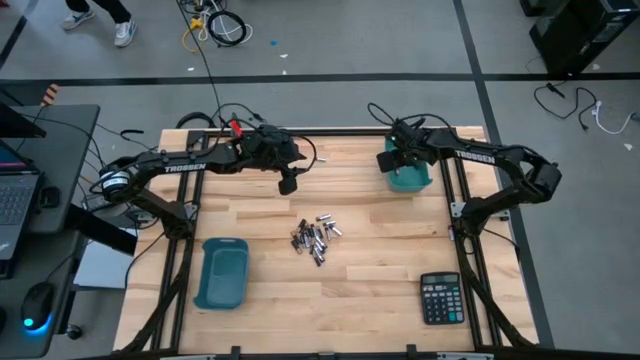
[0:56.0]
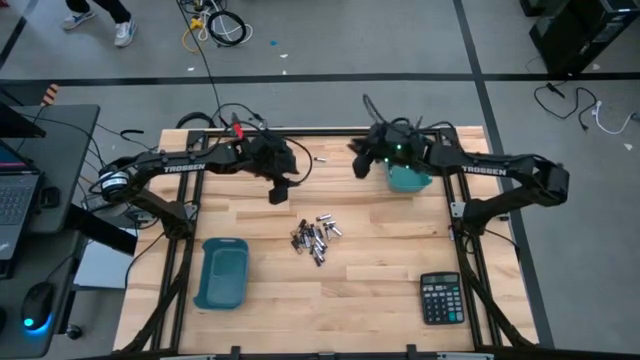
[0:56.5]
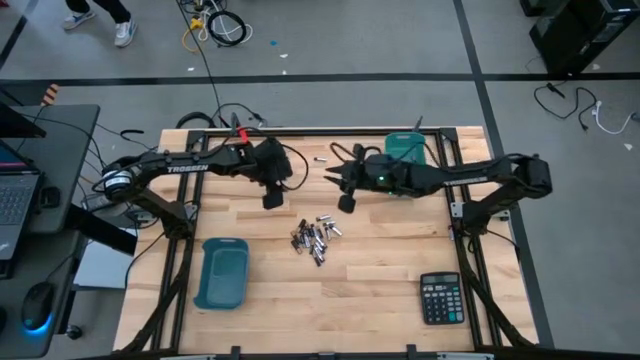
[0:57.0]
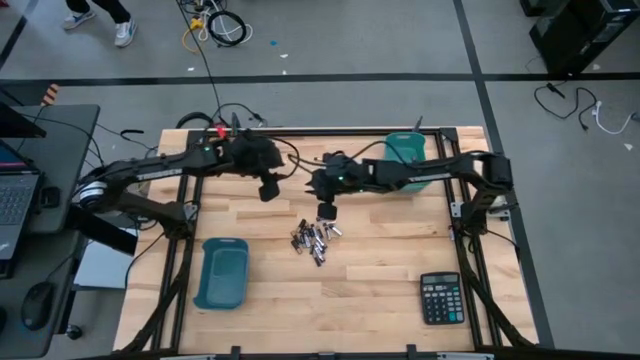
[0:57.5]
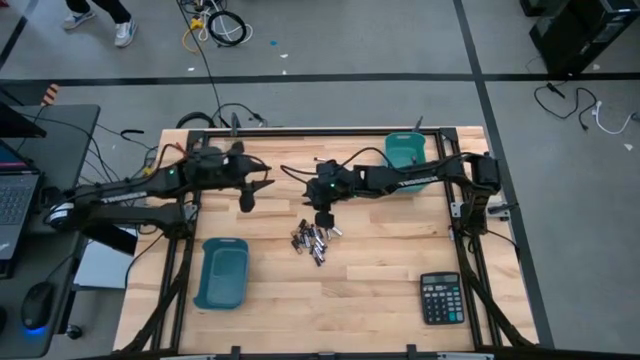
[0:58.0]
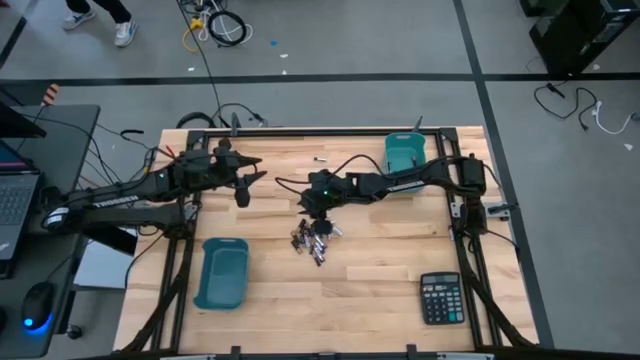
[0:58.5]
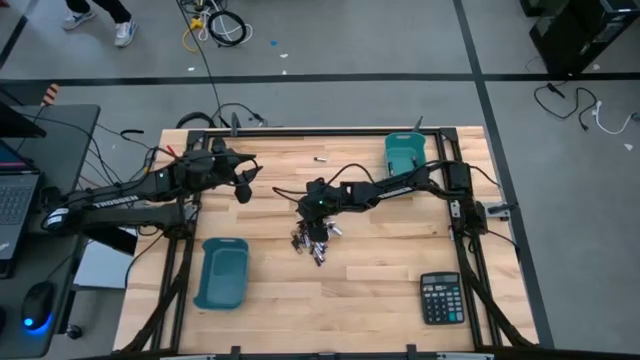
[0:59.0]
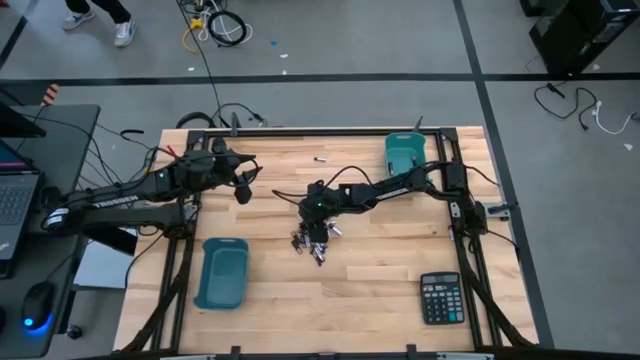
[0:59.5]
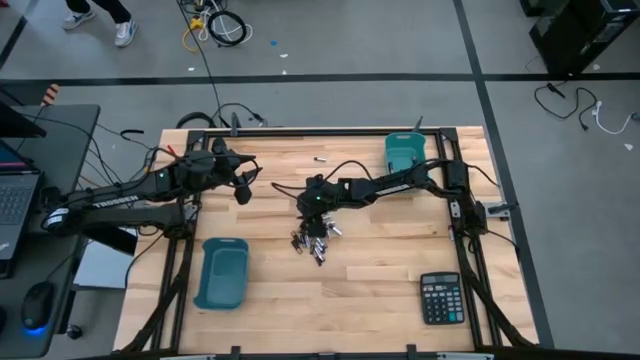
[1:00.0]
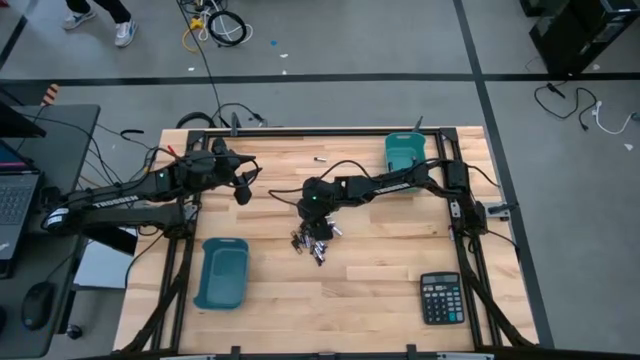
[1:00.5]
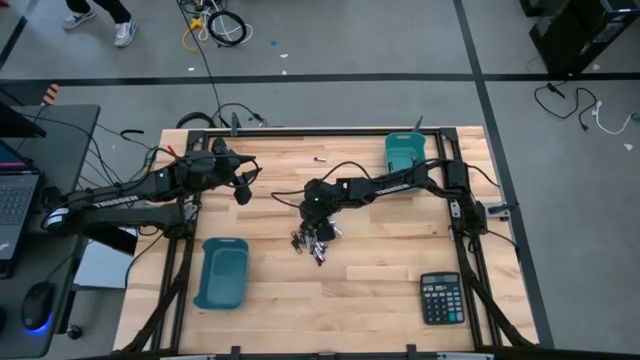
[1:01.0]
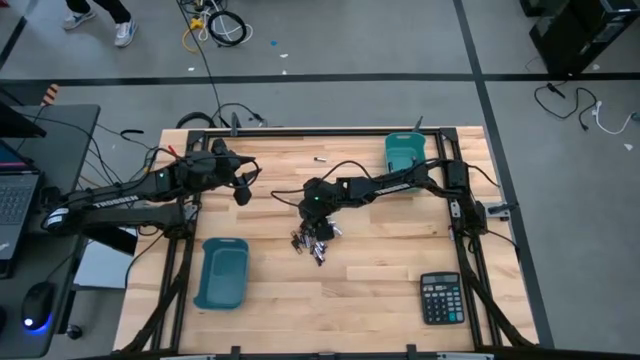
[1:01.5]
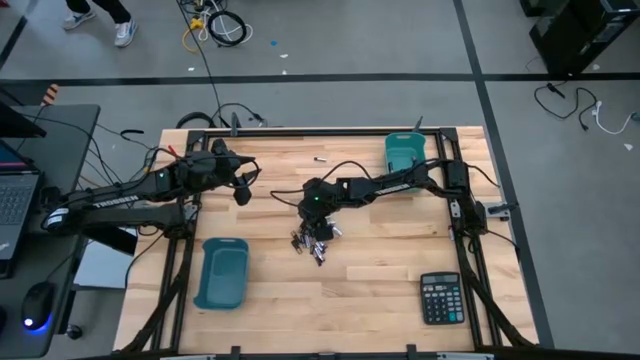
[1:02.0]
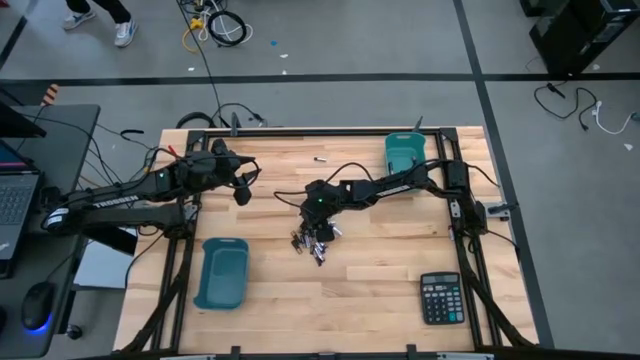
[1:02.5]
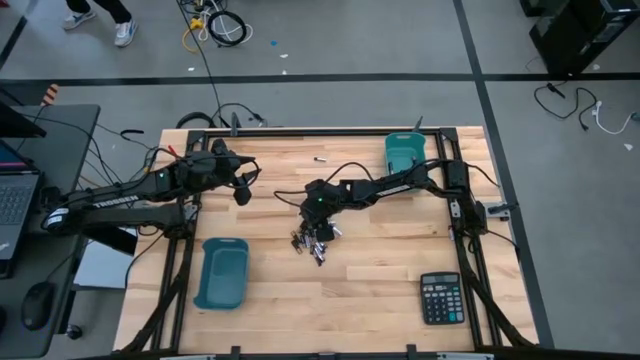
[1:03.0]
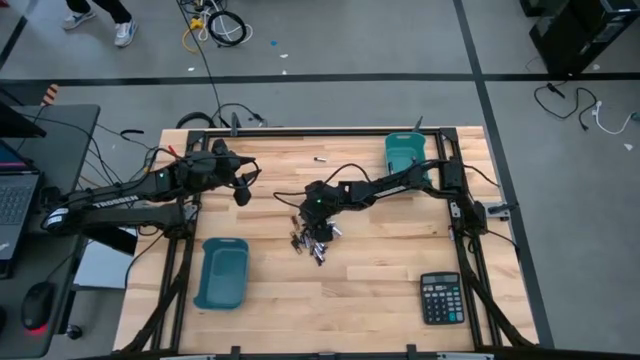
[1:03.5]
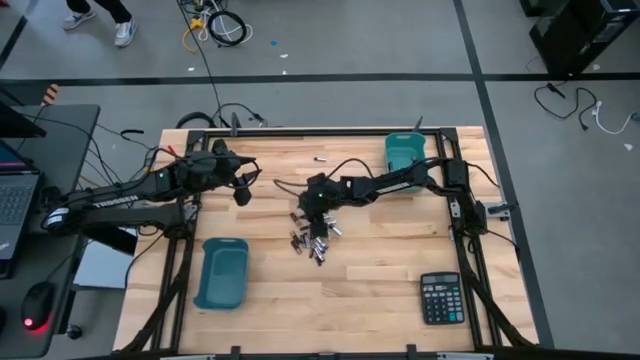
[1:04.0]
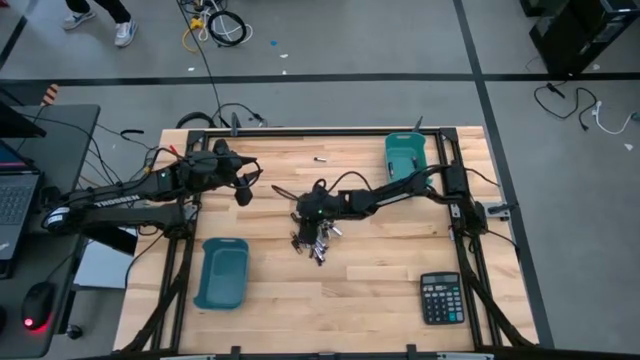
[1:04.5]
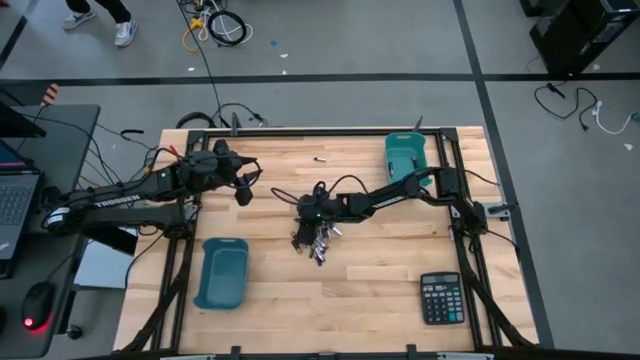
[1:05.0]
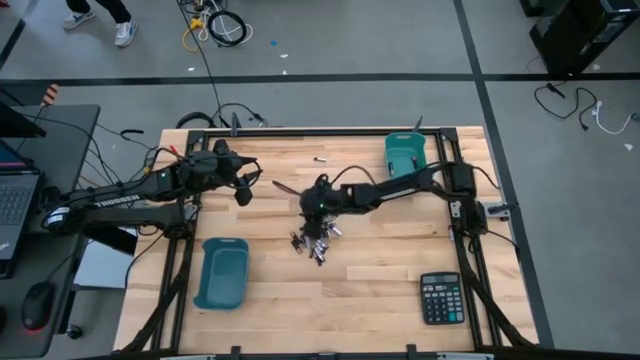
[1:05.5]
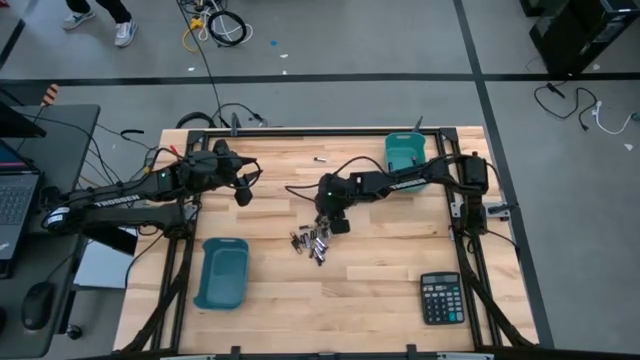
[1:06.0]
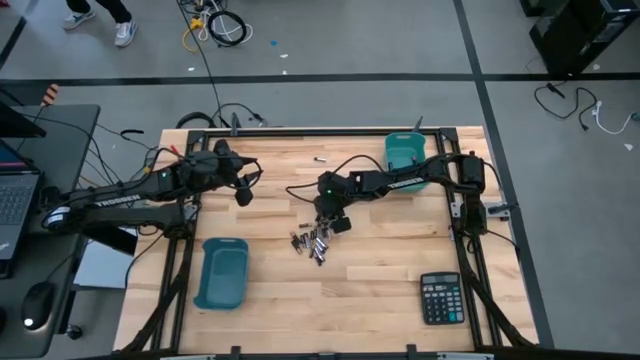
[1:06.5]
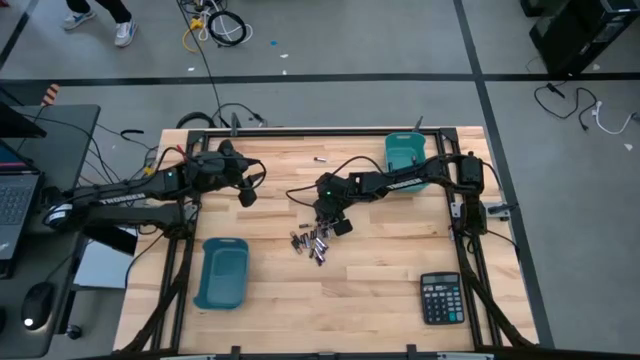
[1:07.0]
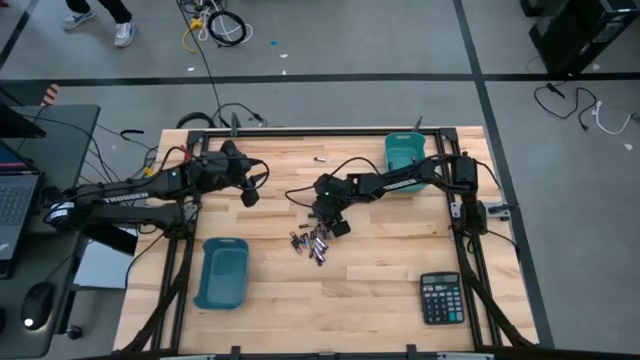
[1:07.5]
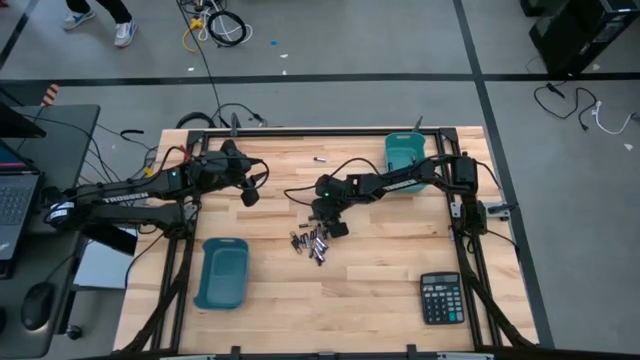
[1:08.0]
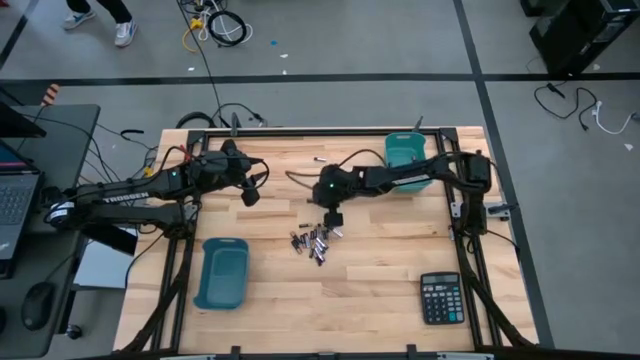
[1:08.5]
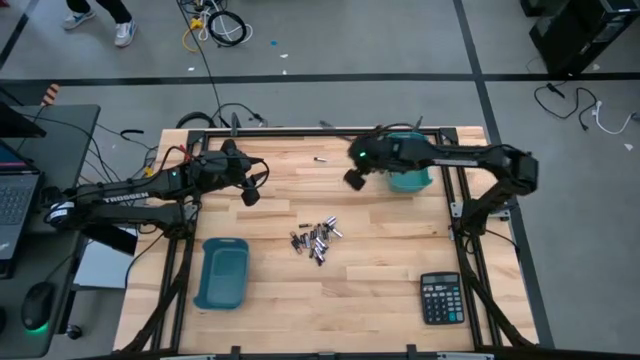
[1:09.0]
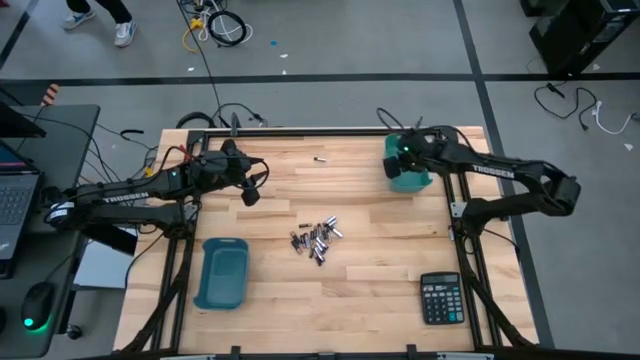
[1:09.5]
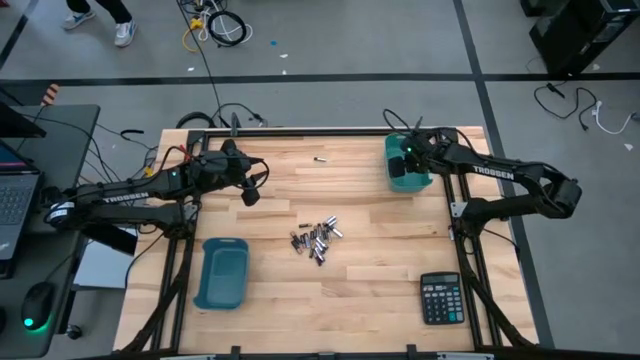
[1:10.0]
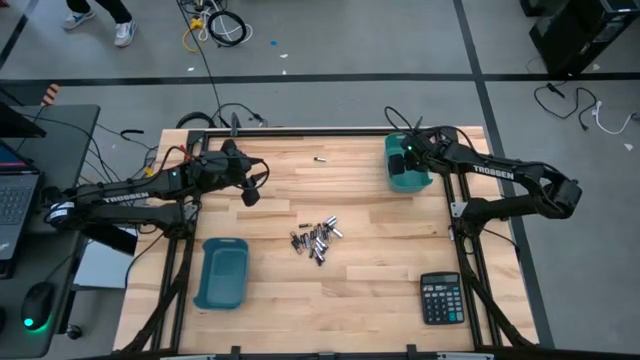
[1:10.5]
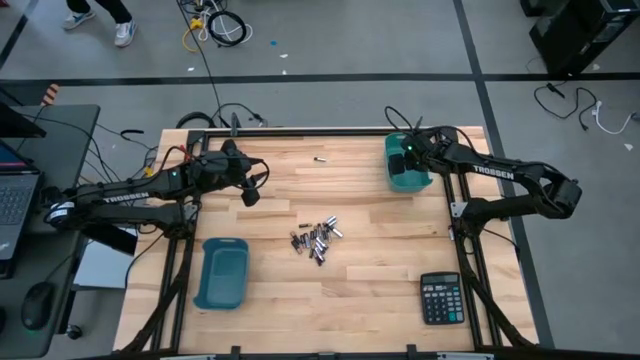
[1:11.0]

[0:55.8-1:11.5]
Task: Sort batteries
Put the black battery into the green bin

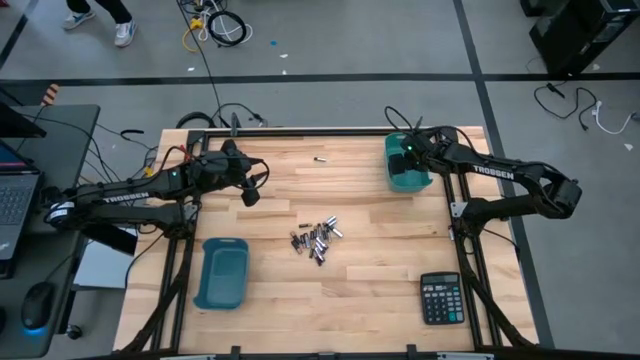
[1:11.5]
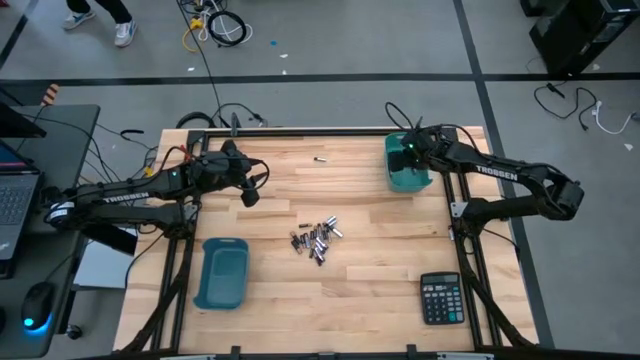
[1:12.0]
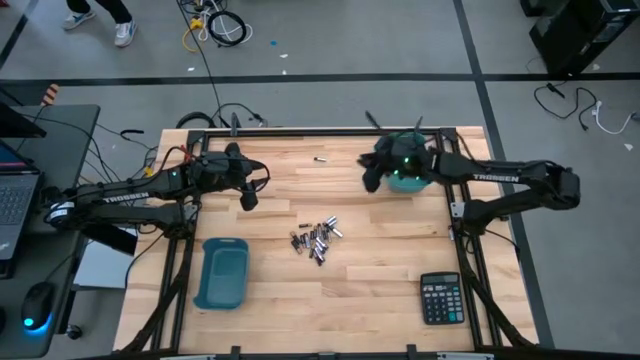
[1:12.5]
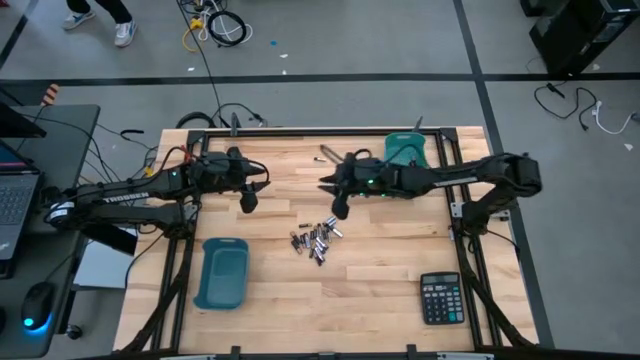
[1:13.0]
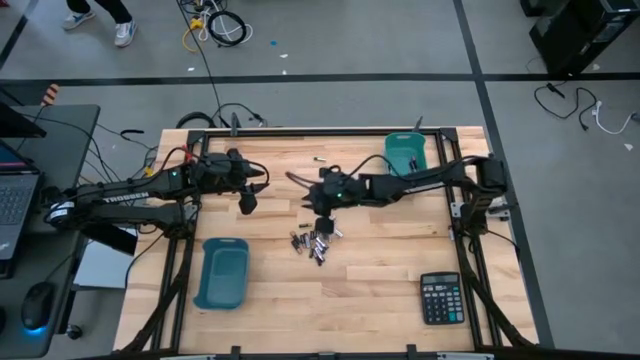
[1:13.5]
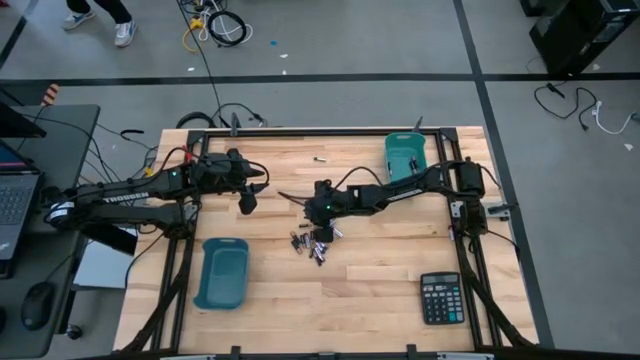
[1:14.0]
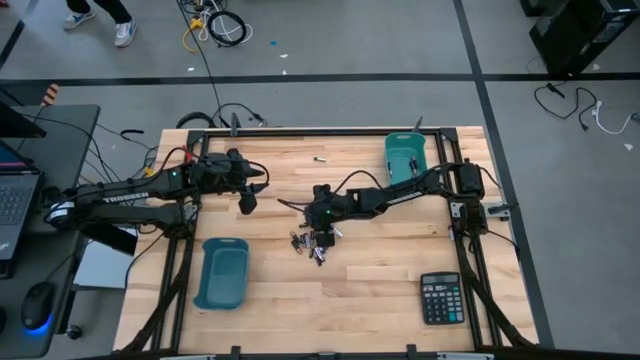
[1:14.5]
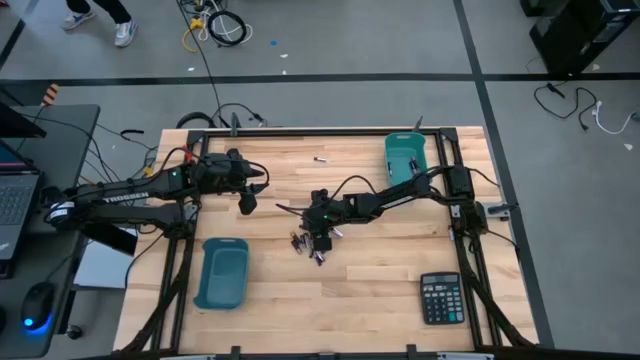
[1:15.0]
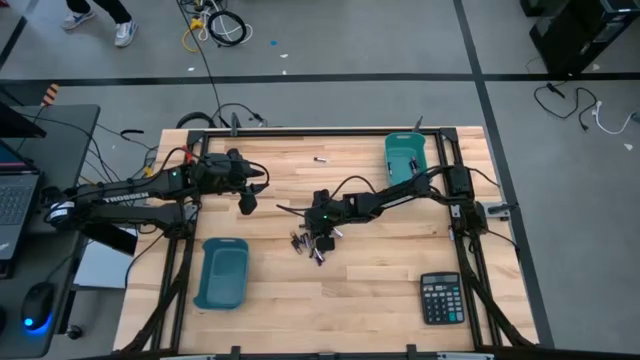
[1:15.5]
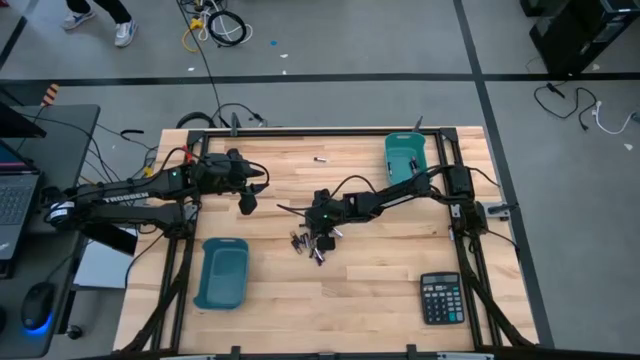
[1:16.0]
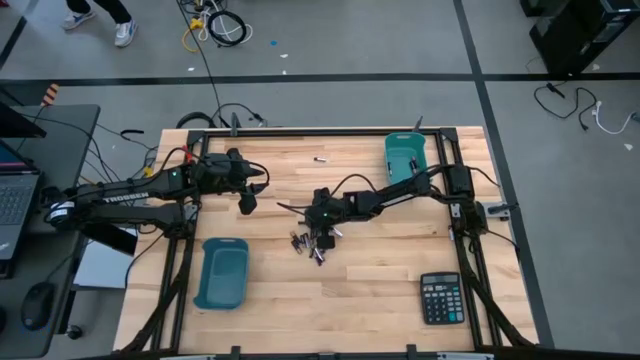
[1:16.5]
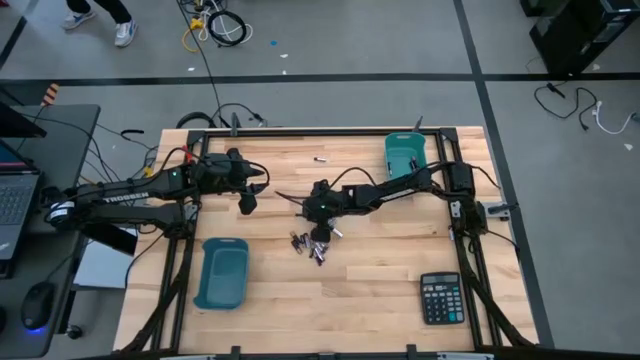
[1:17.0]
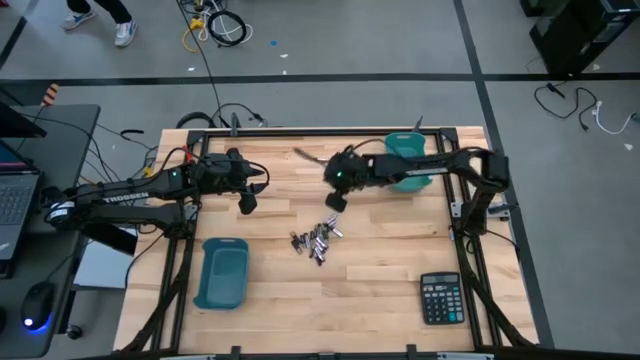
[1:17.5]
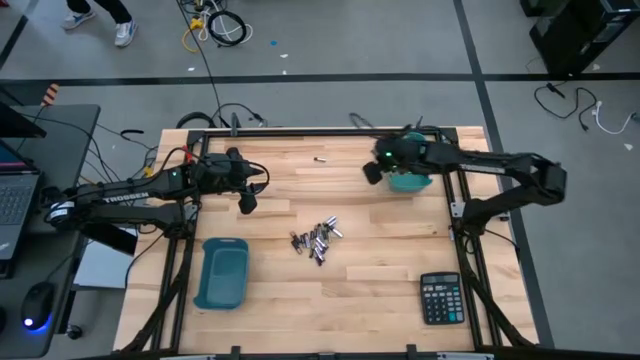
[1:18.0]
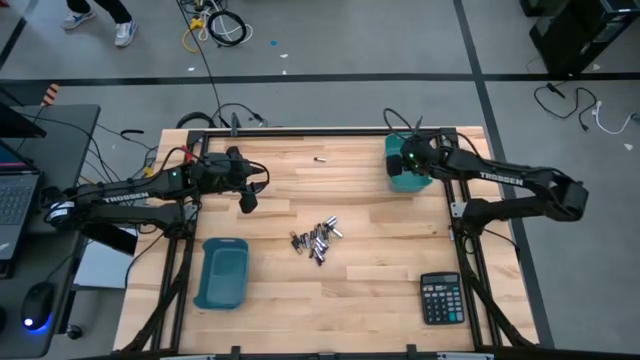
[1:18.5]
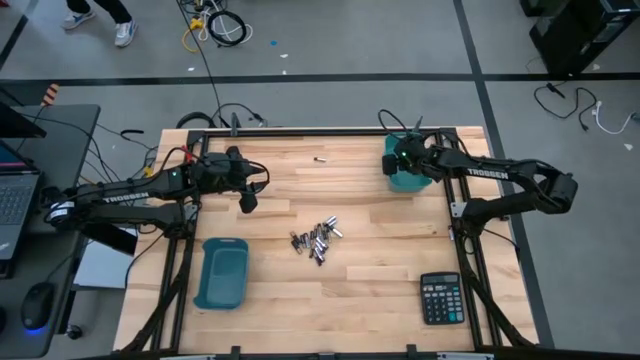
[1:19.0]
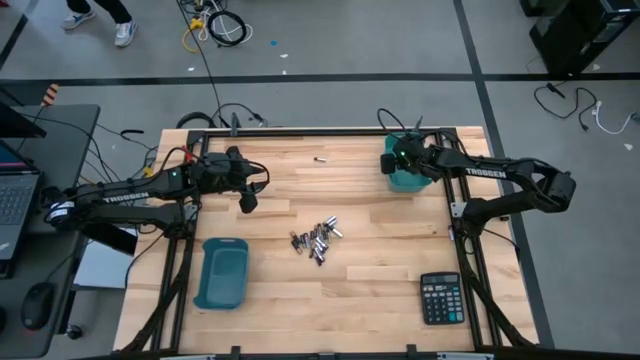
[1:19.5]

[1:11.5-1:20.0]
Put the black battery into the green bin
